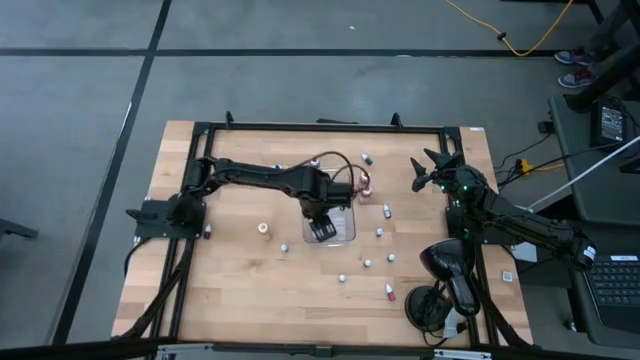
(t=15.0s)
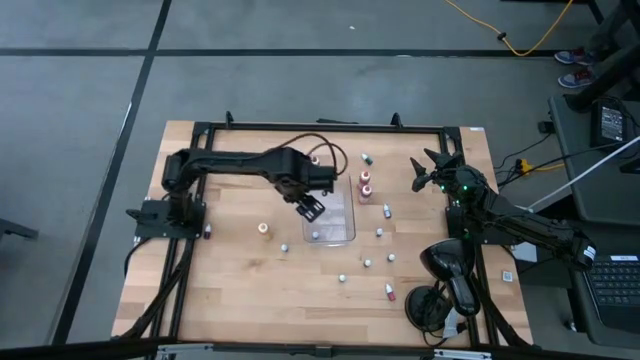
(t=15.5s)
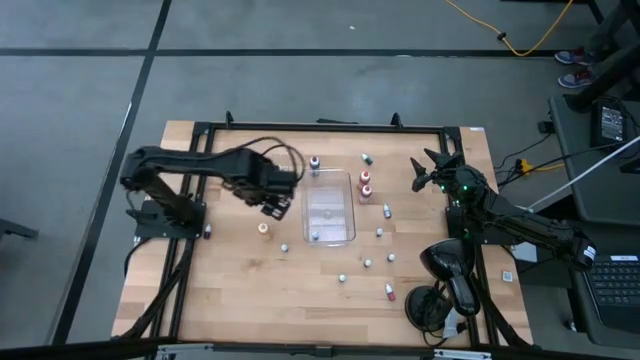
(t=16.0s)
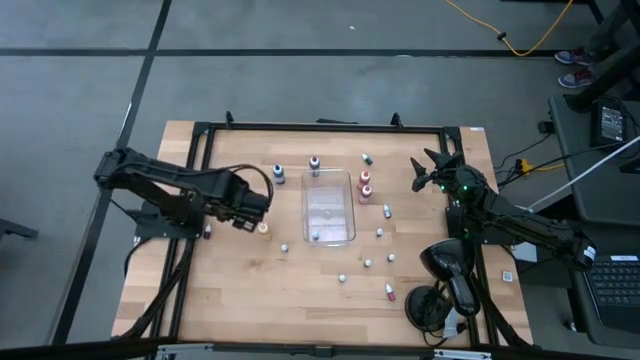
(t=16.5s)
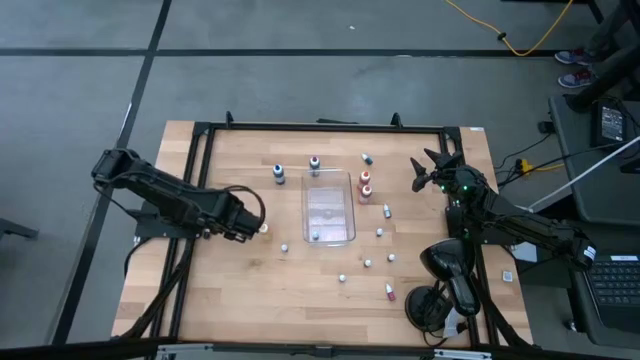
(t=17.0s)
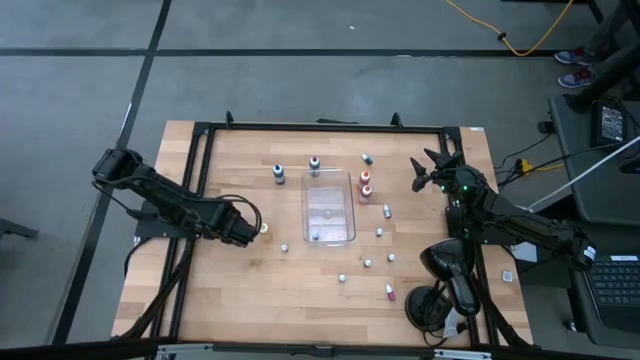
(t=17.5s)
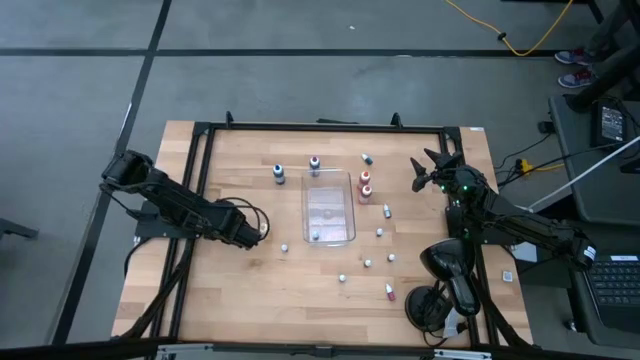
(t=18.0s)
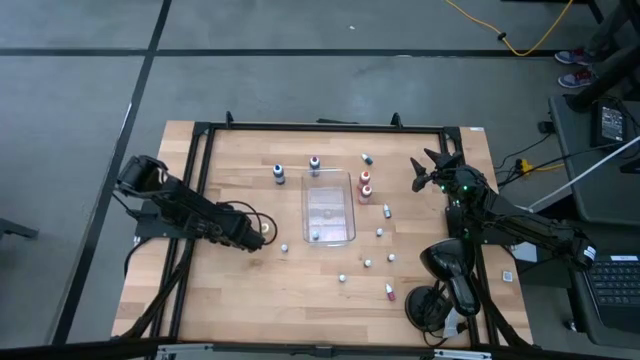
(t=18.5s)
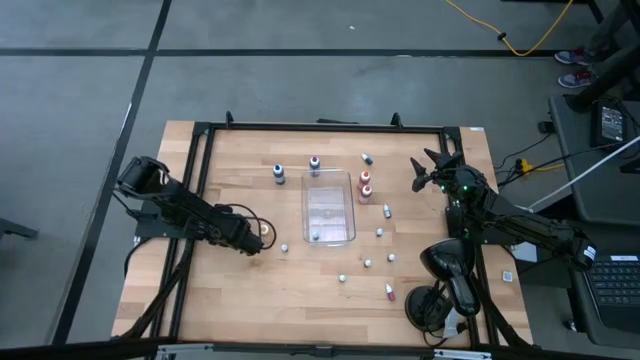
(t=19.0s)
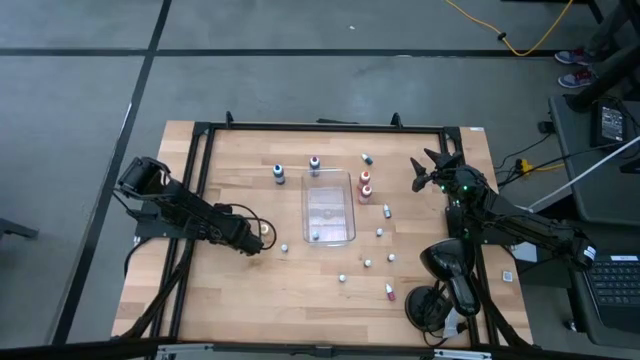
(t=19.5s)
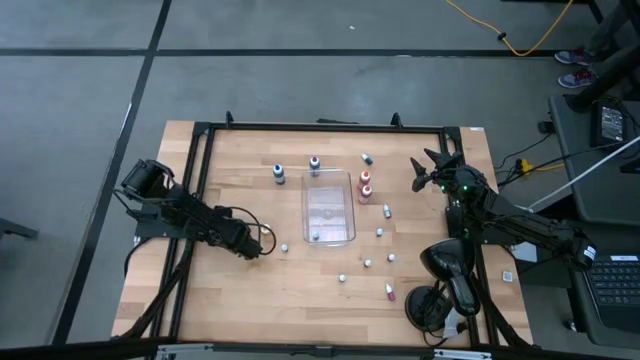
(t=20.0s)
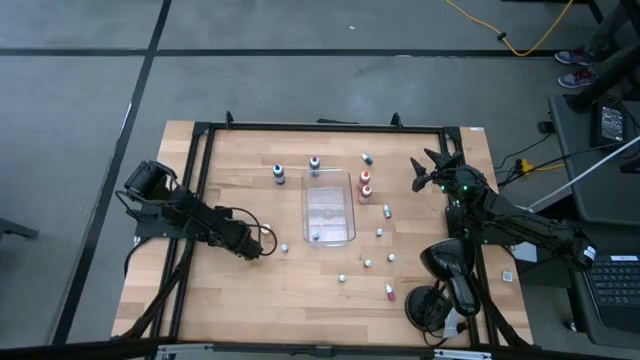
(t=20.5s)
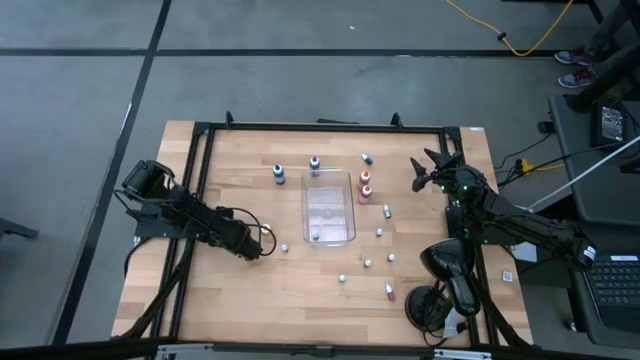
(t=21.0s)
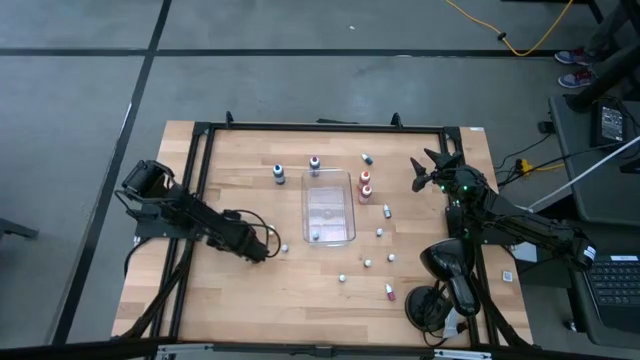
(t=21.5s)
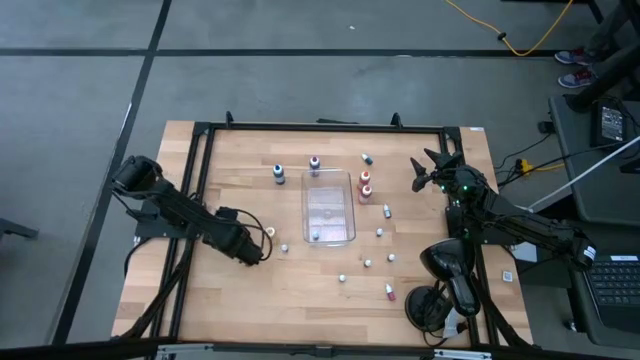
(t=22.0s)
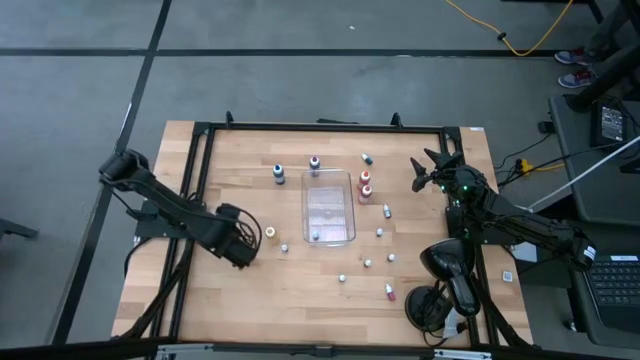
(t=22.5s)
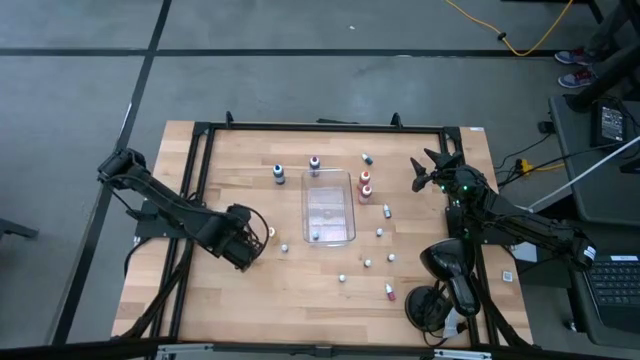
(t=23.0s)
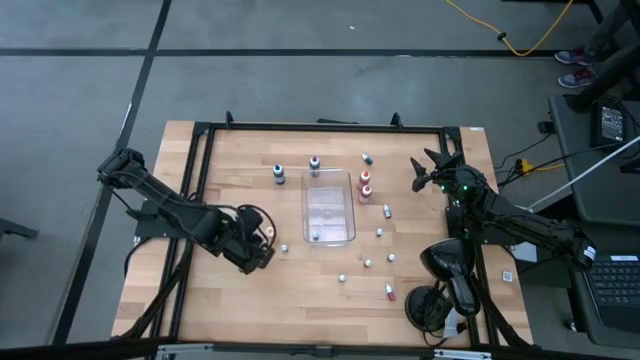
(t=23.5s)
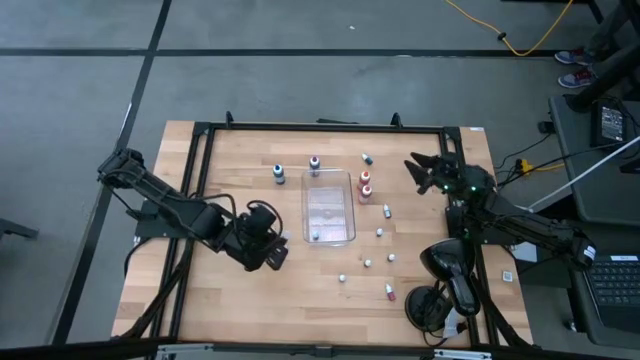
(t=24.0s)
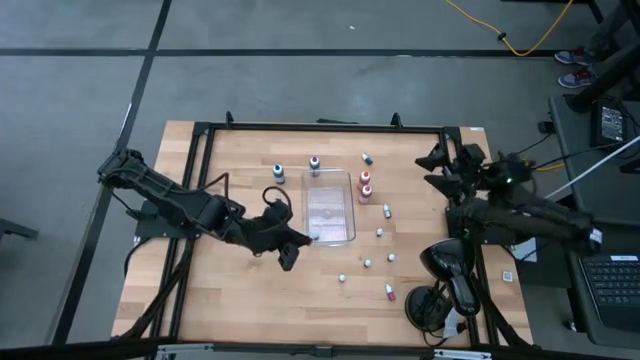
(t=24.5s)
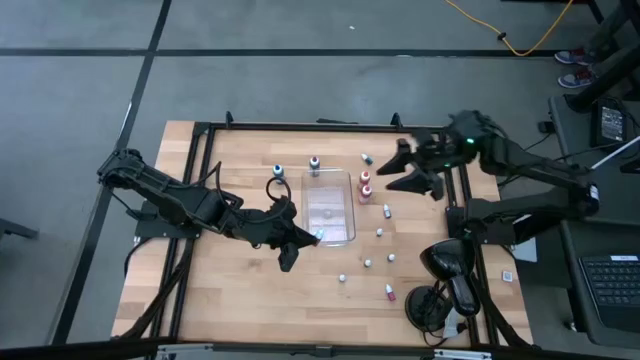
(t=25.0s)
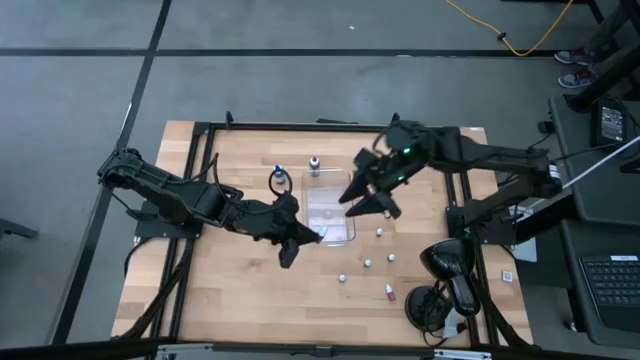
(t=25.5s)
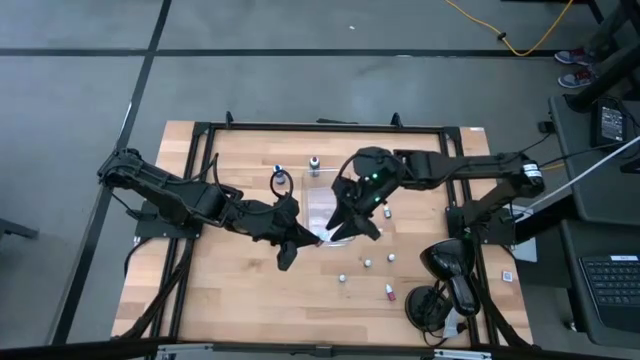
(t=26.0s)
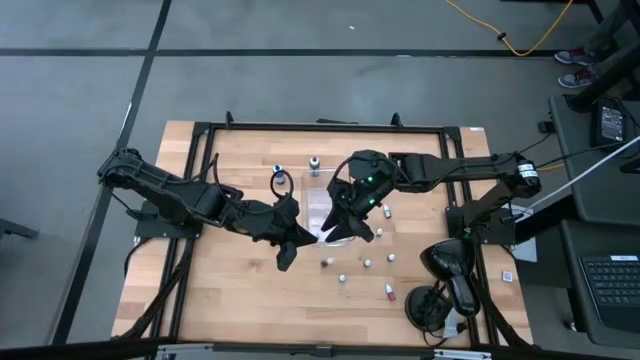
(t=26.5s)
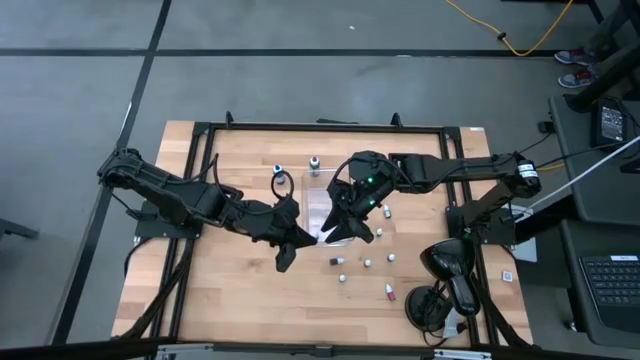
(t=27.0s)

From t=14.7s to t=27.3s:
Task: Pick & Place food coloring
Put the small pink food coloring bottle into the bottom of the bin

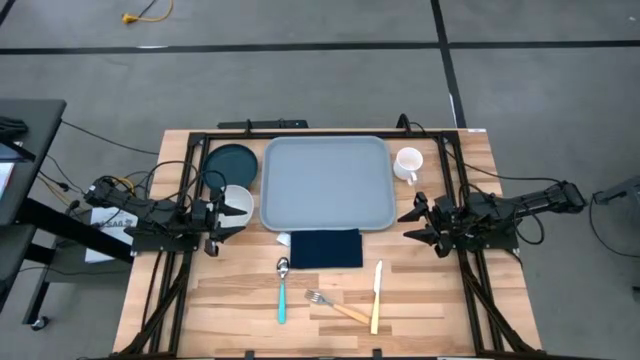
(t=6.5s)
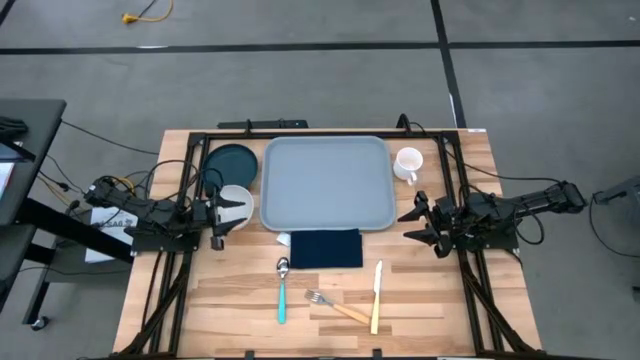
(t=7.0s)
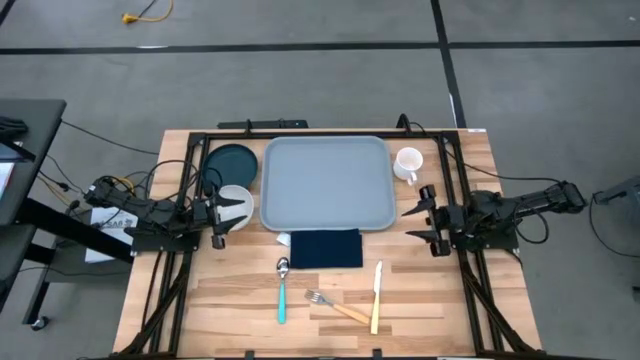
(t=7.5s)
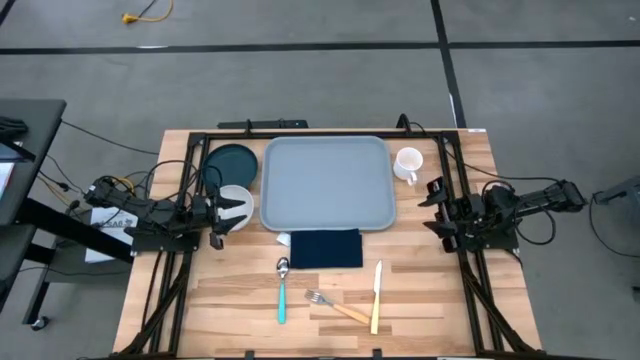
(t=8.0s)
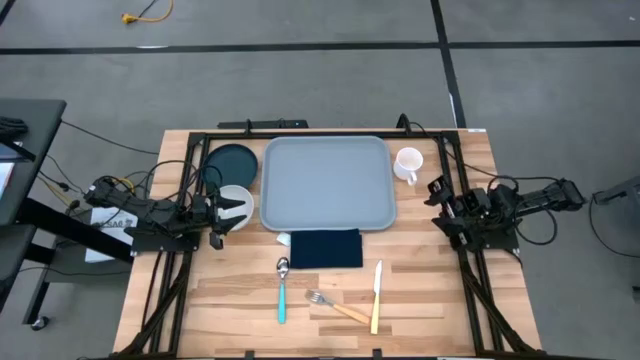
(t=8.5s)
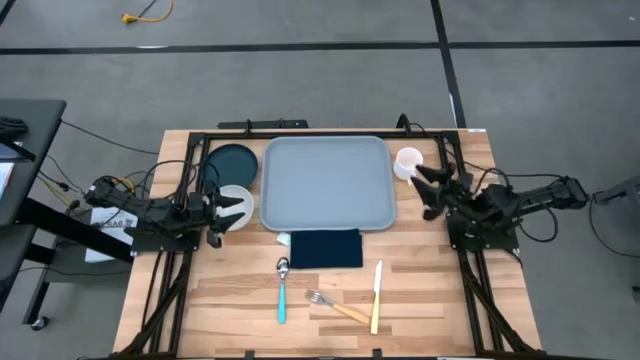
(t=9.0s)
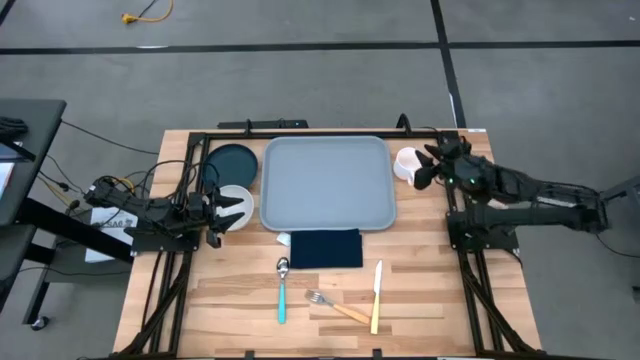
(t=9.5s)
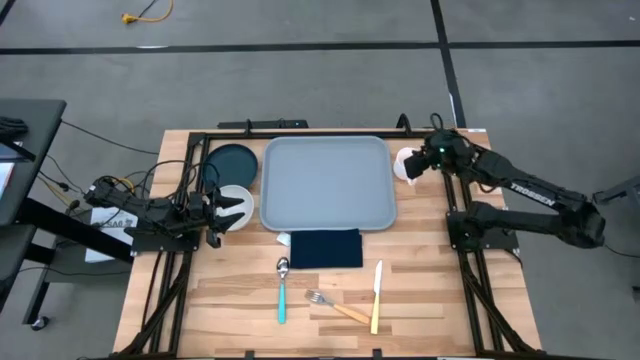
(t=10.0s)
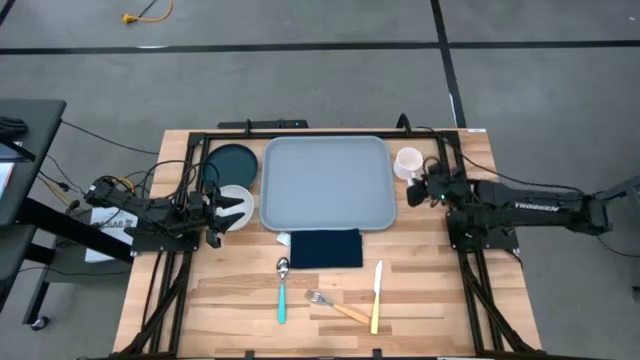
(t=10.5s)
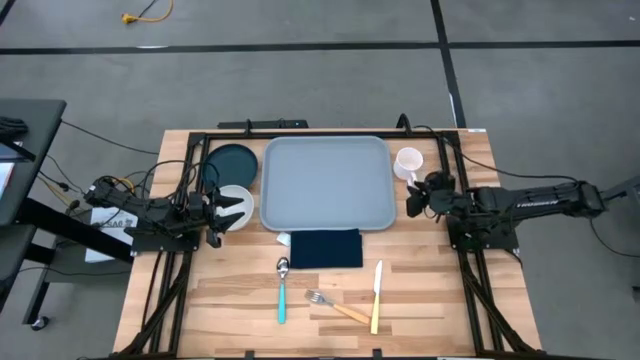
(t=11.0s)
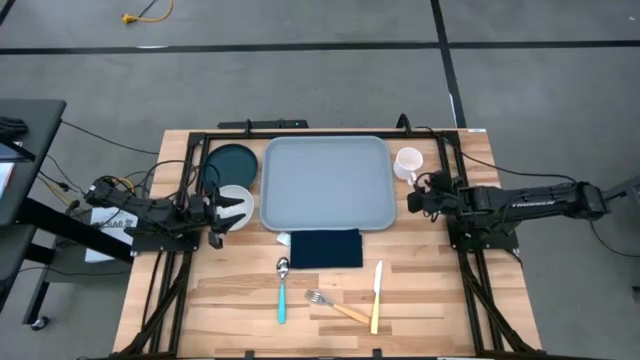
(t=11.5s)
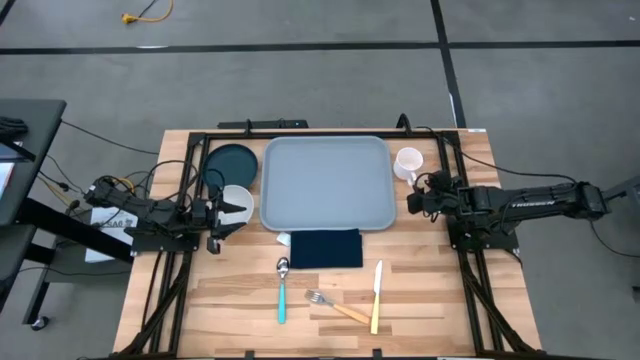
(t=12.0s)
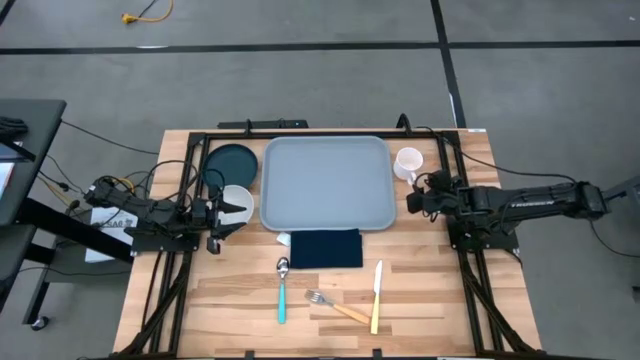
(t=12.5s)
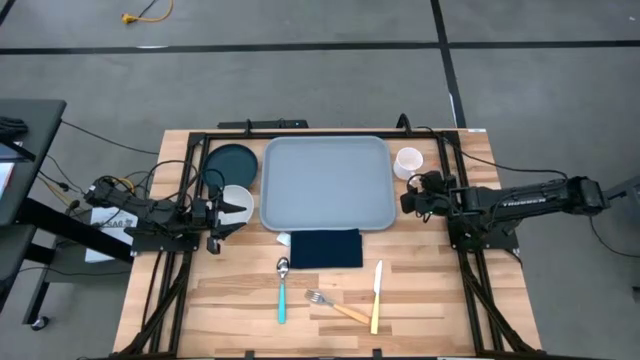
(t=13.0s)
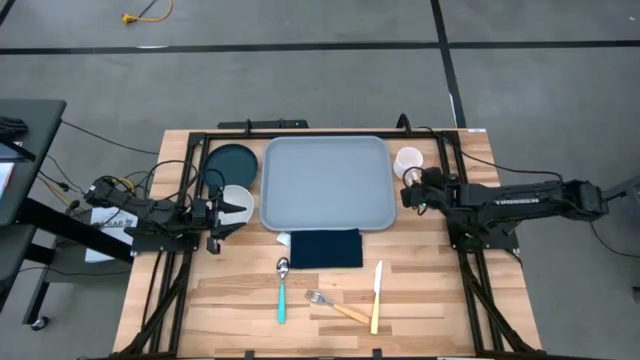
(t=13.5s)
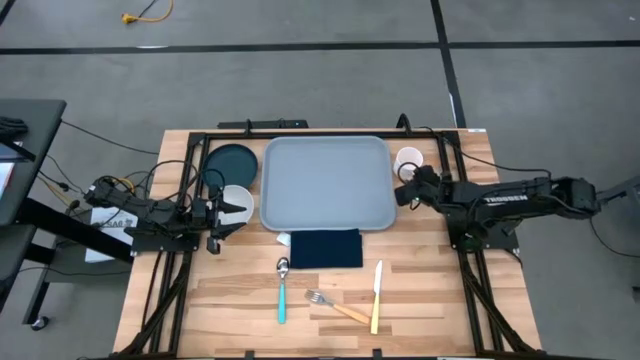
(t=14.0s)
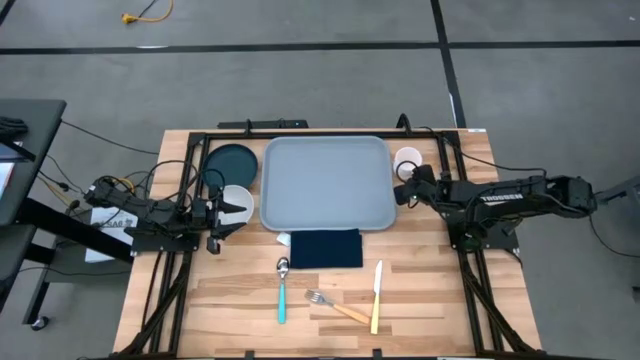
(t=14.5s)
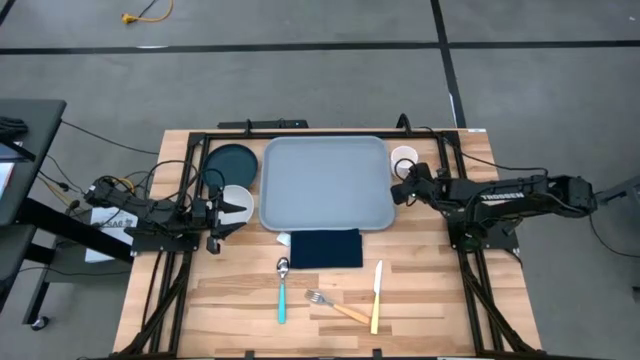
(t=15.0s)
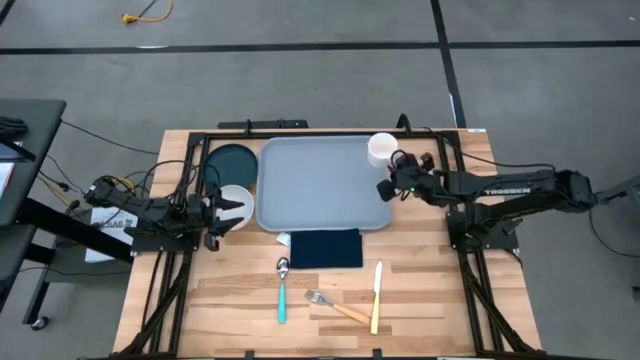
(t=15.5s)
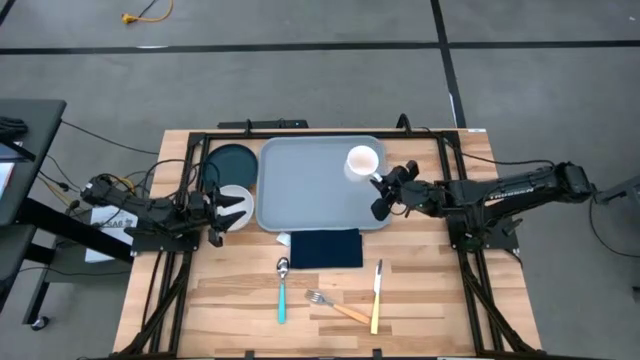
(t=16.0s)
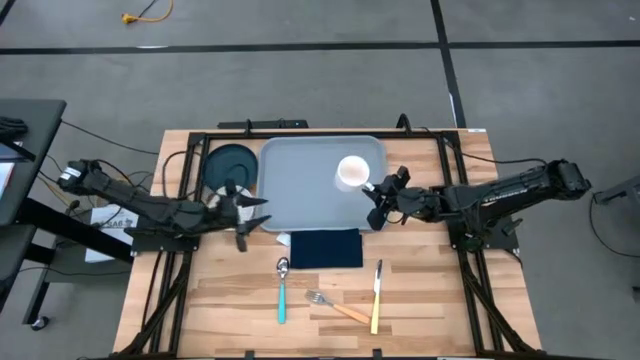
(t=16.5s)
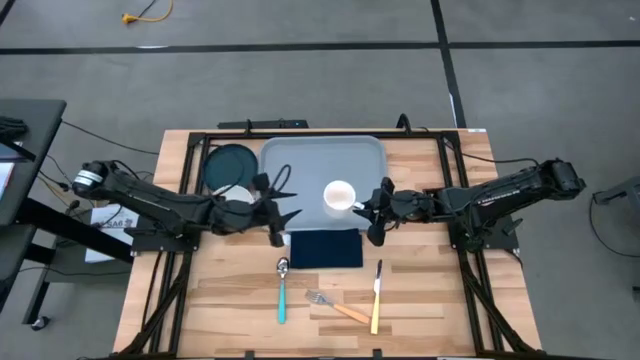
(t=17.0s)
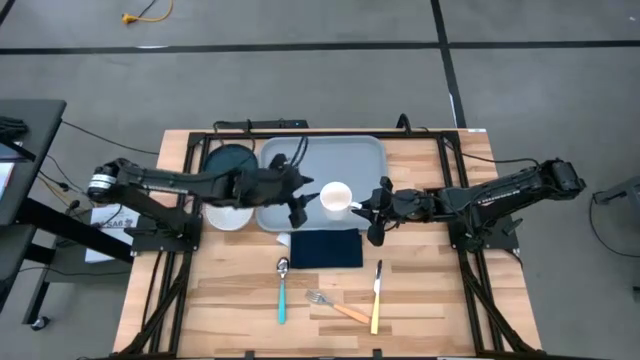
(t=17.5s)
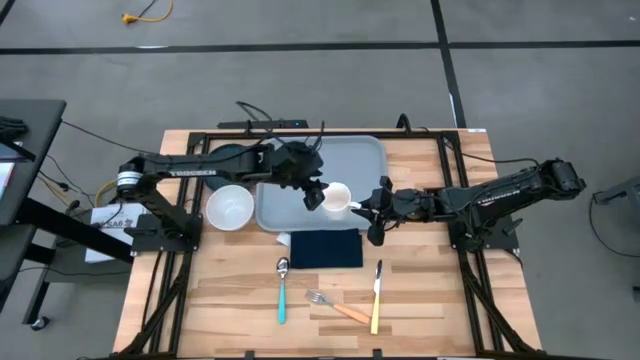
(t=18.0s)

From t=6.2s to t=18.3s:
Task: Set up tray
Put the white cup on the top left of the gray serving tray
